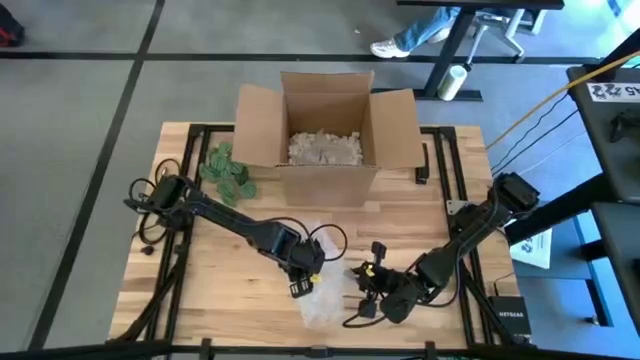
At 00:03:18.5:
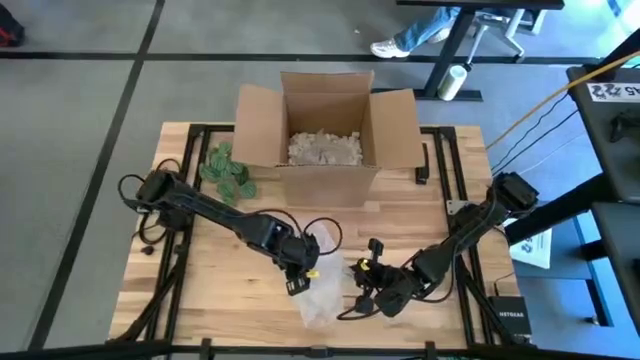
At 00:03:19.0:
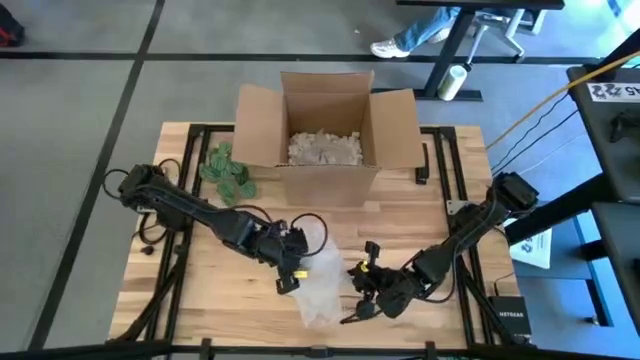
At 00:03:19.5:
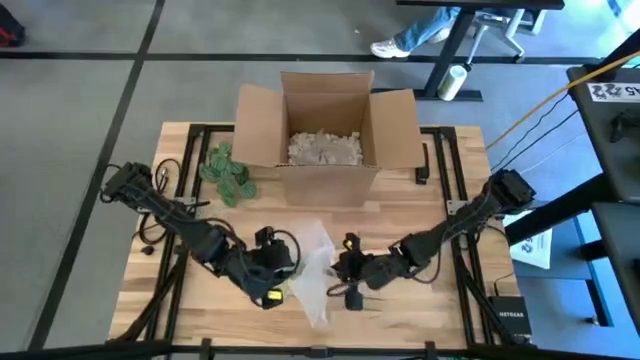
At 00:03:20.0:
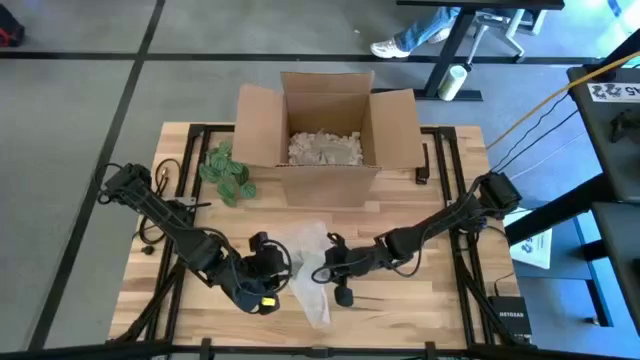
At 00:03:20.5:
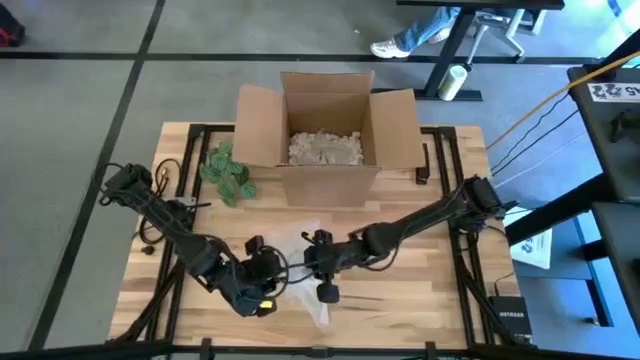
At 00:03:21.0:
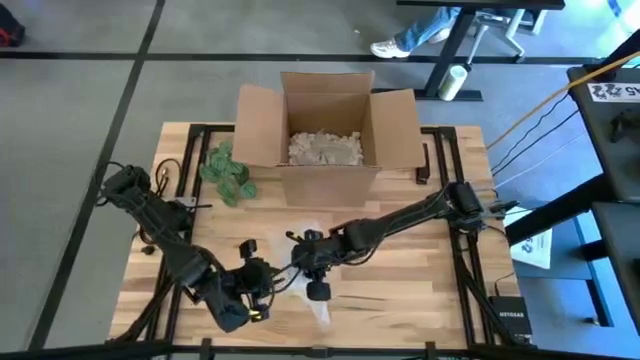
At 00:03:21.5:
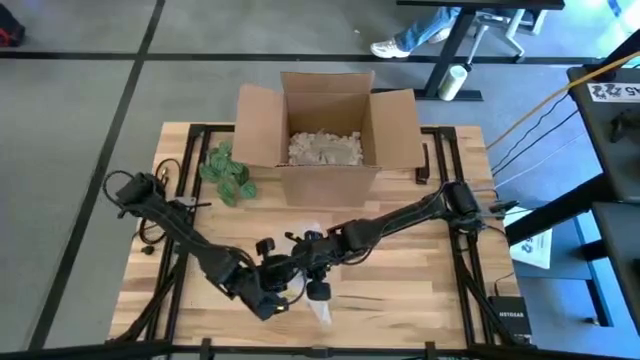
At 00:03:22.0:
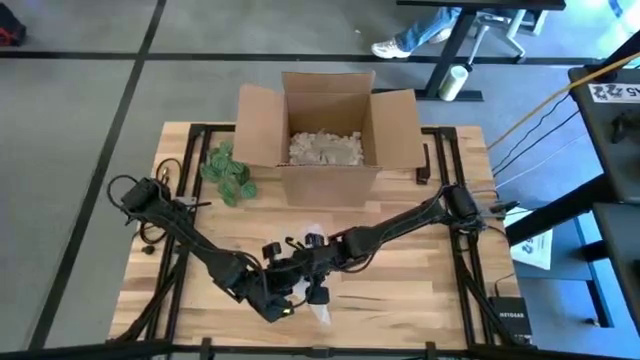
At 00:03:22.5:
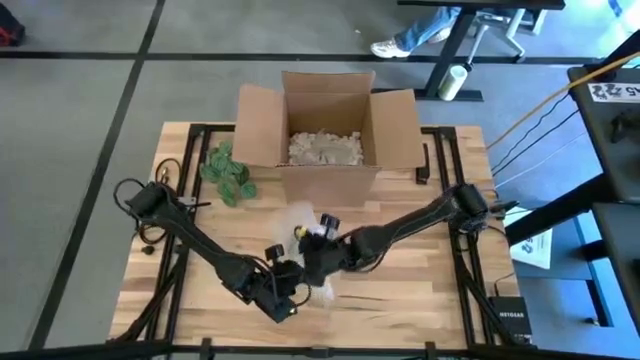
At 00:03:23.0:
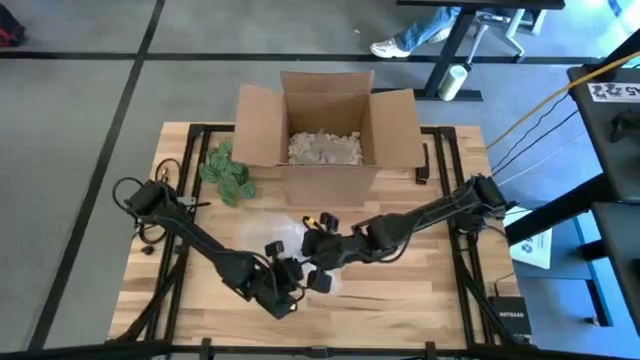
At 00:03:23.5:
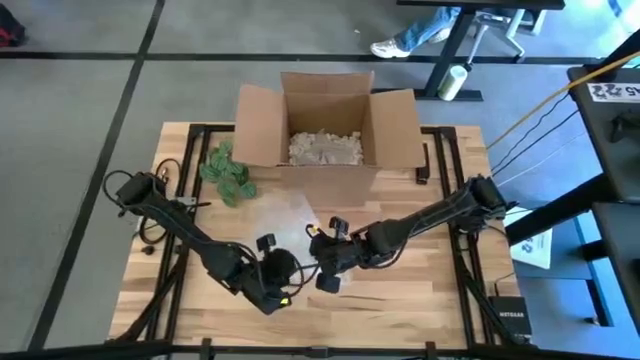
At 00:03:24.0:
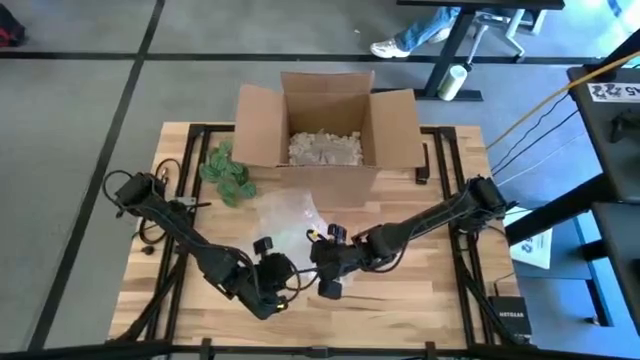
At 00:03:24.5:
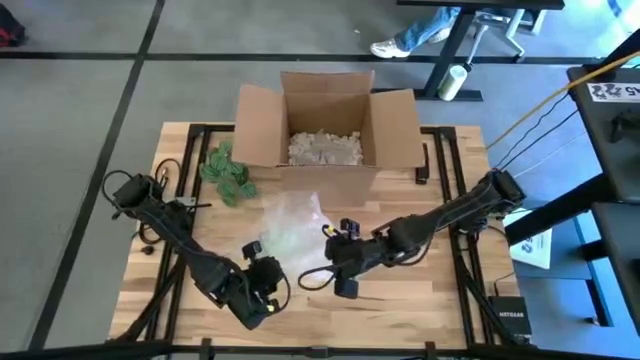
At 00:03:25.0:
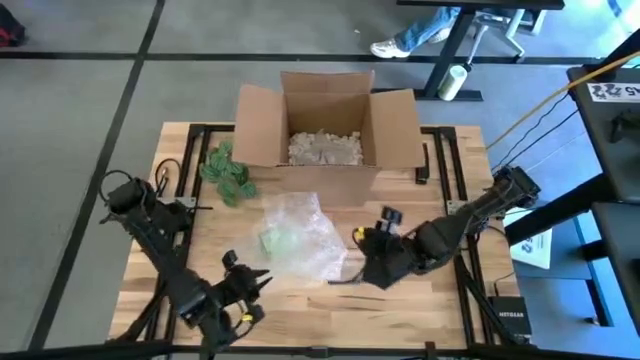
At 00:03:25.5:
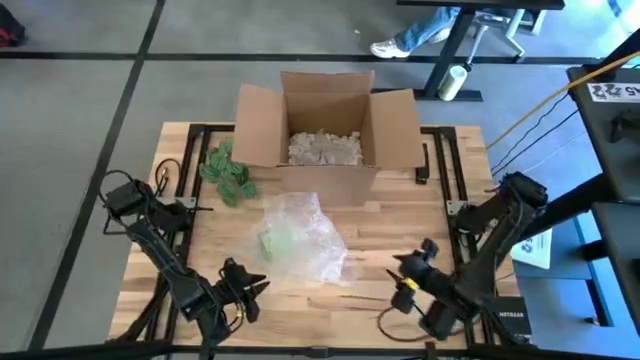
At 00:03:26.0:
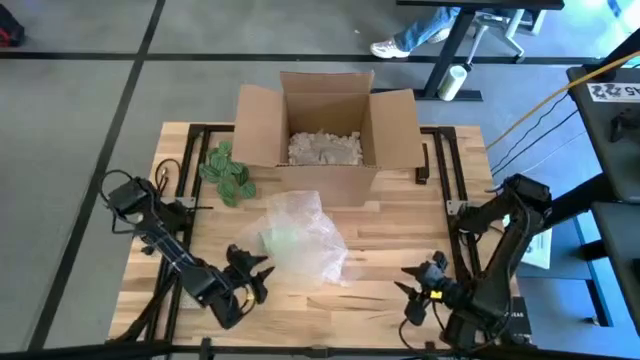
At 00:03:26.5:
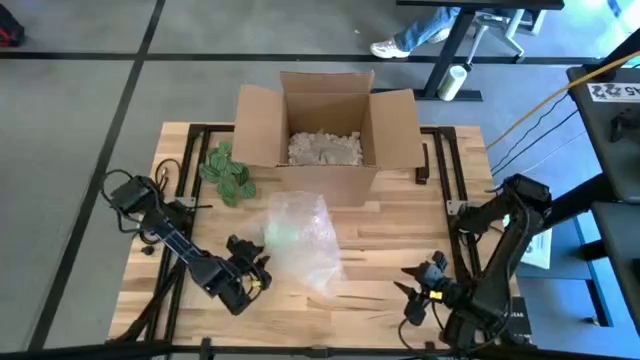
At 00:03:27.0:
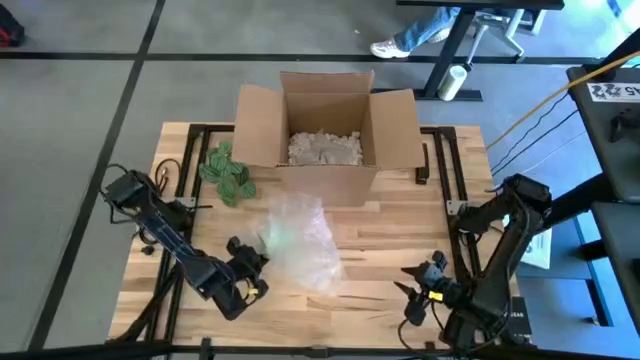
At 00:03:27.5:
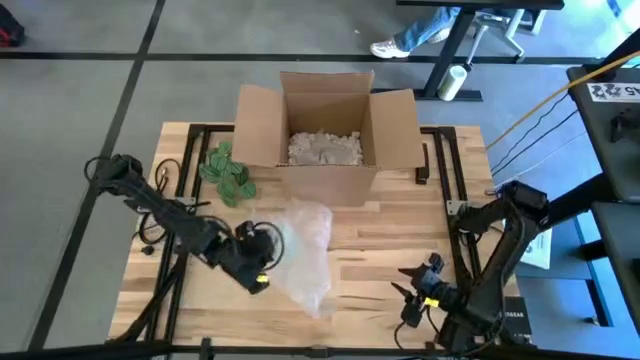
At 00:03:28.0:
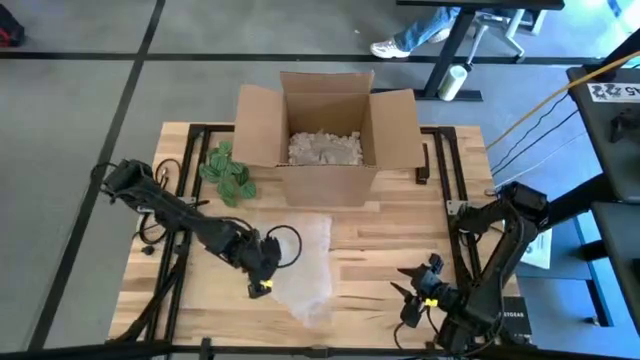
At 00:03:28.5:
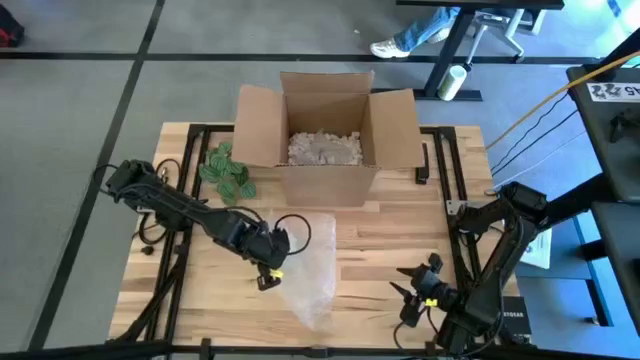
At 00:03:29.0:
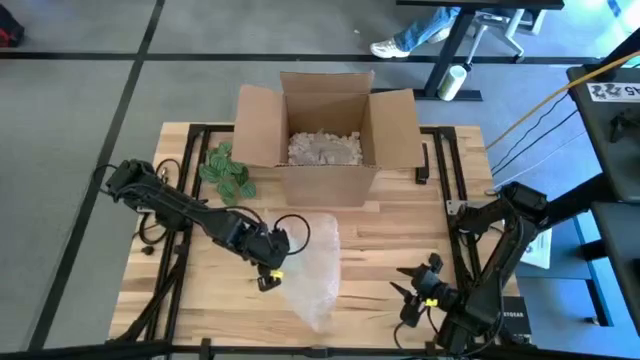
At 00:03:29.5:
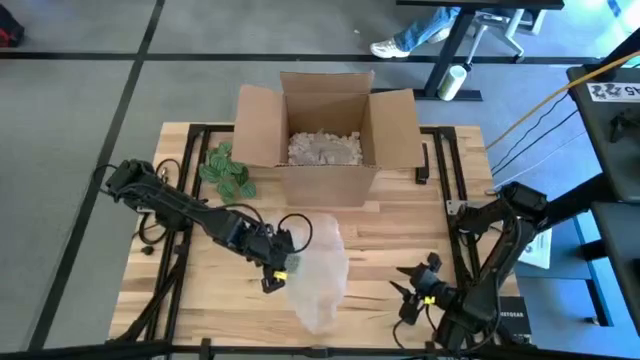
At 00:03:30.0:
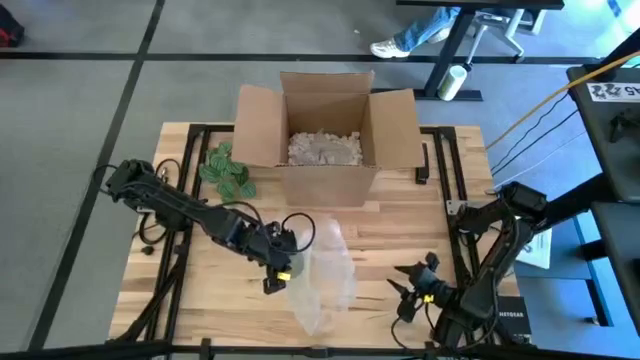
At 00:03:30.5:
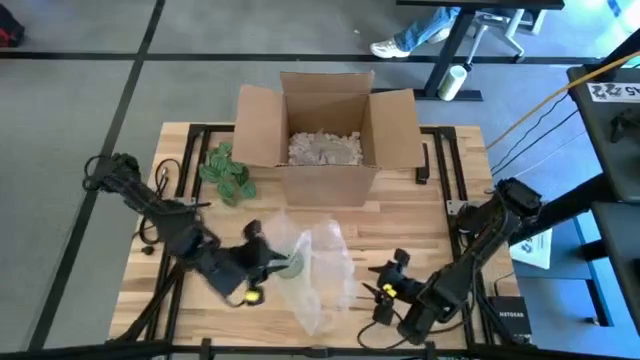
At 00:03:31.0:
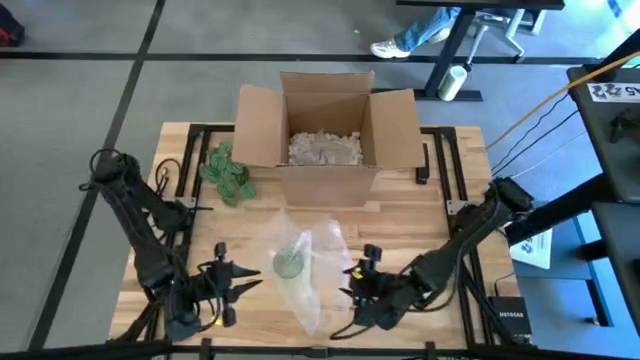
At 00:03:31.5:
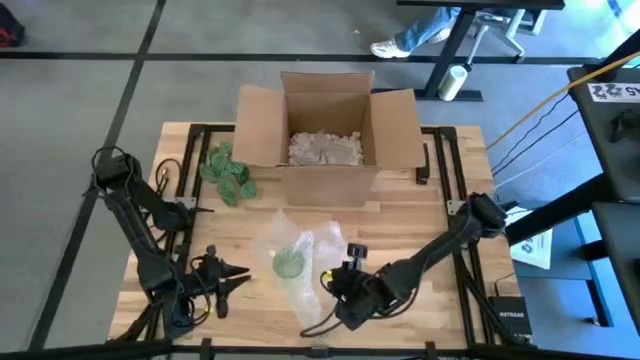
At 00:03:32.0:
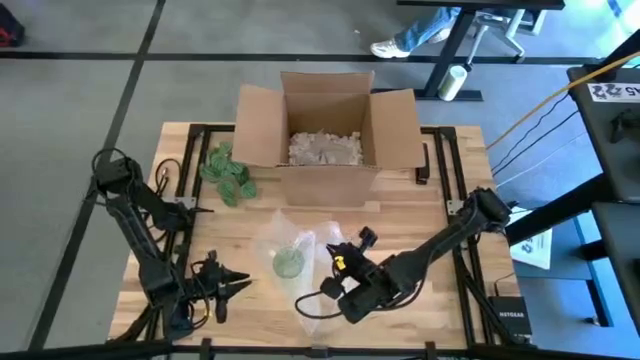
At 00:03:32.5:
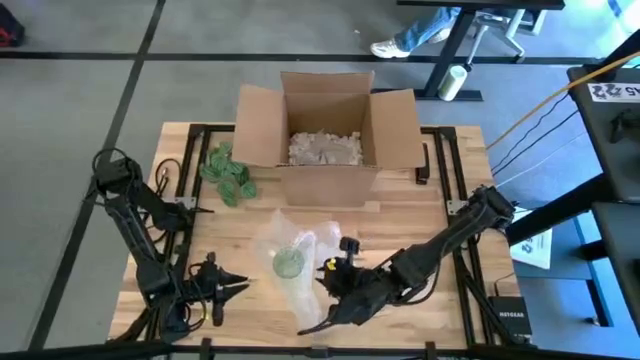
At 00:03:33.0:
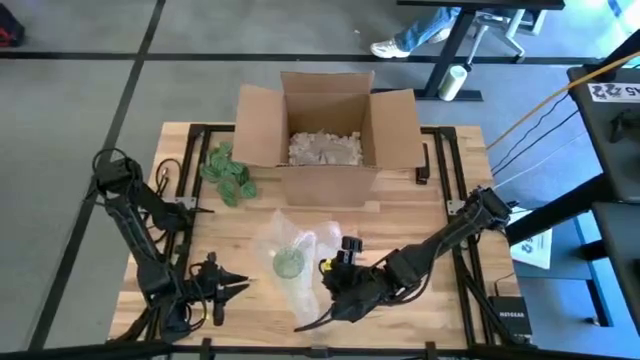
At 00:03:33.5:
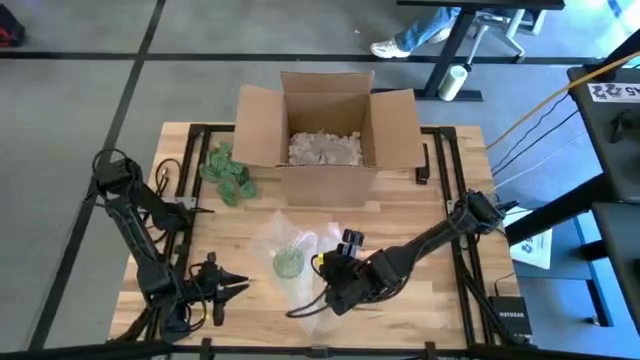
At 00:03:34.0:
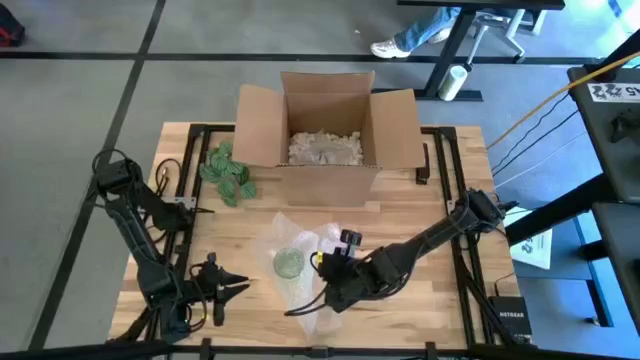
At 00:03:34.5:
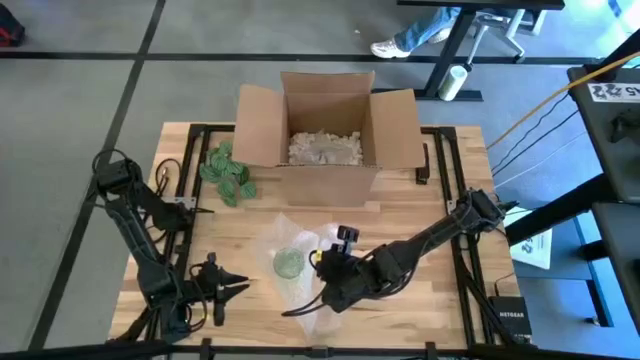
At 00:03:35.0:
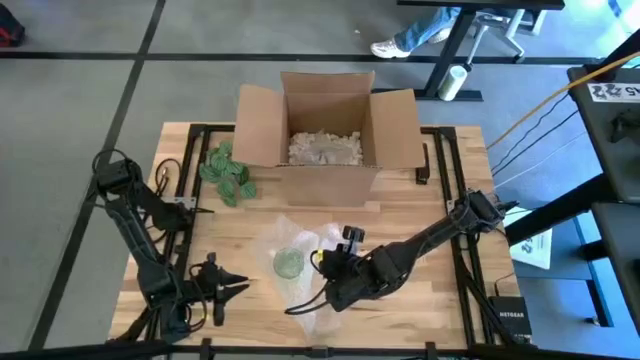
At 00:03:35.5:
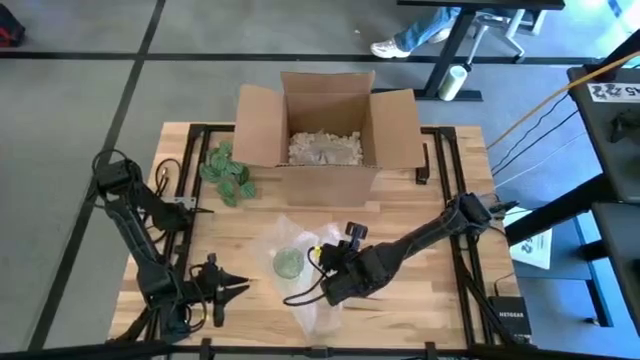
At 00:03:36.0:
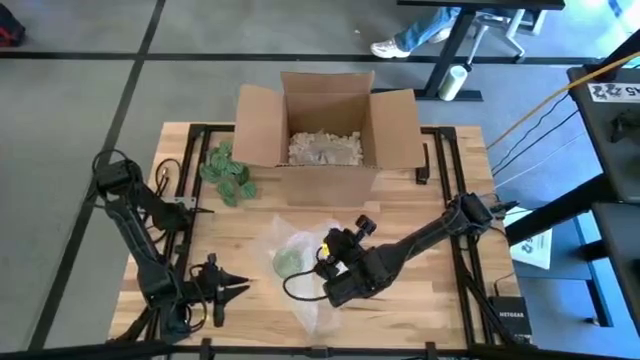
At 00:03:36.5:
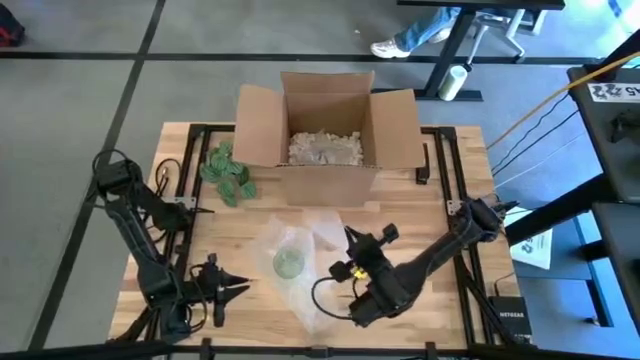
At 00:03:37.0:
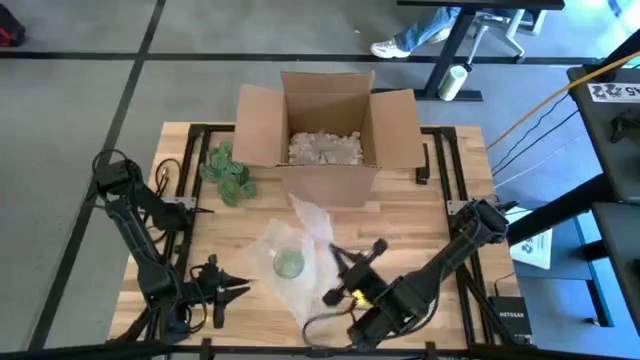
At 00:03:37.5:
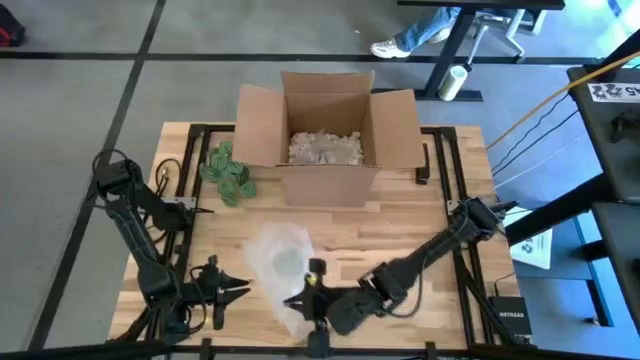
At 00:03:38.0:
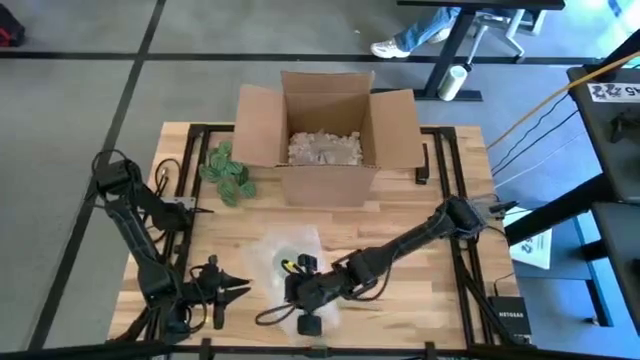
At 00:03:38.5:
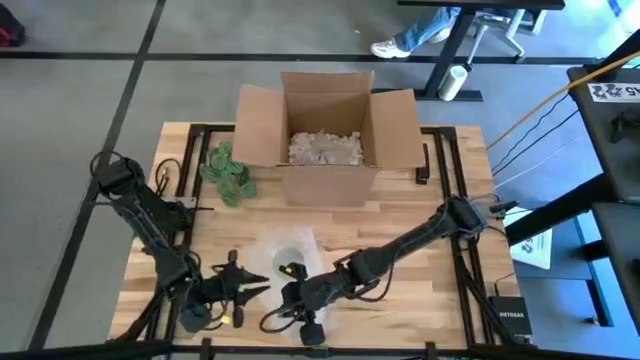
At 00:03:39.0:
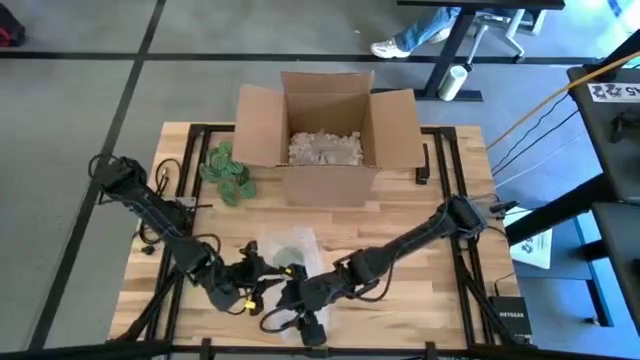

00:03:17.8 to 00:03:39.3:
Task: wrap mug
Wrap the green mug in bubble wrap
